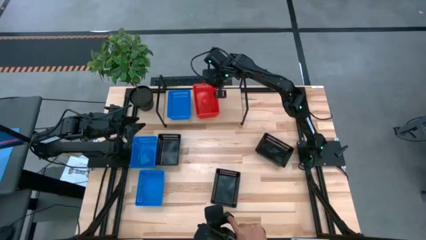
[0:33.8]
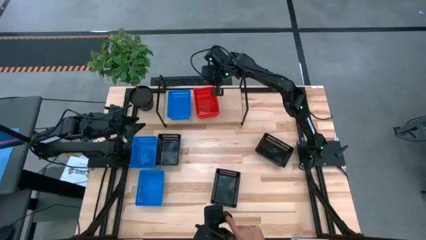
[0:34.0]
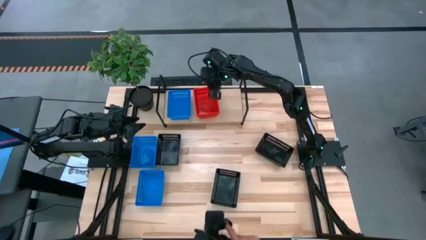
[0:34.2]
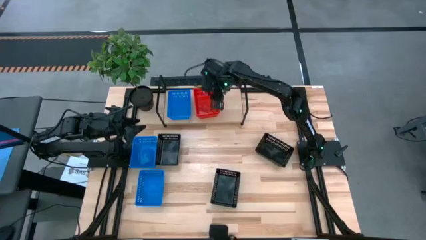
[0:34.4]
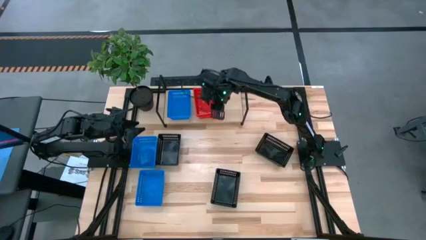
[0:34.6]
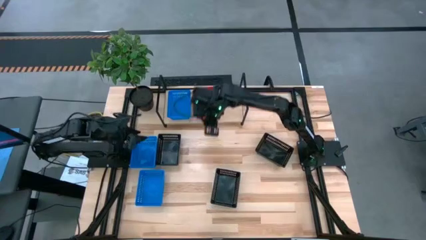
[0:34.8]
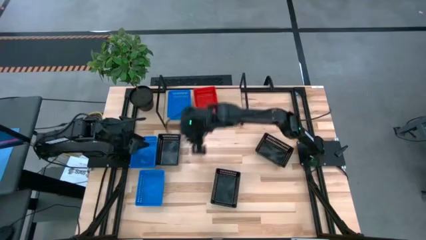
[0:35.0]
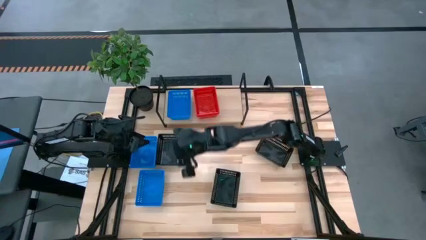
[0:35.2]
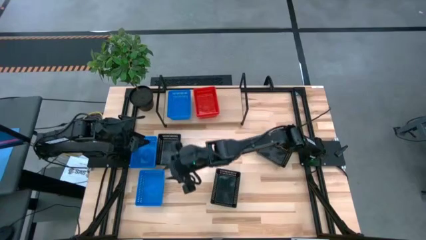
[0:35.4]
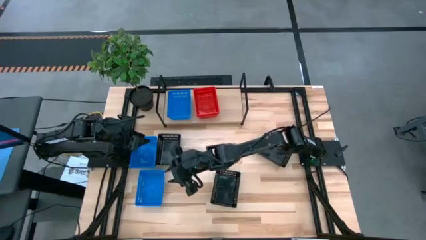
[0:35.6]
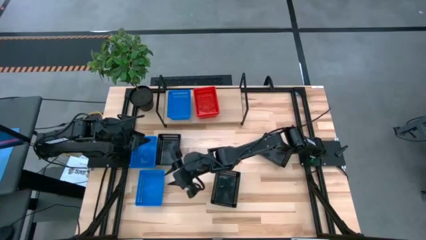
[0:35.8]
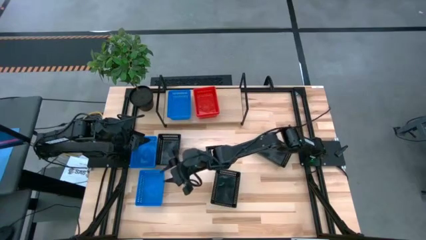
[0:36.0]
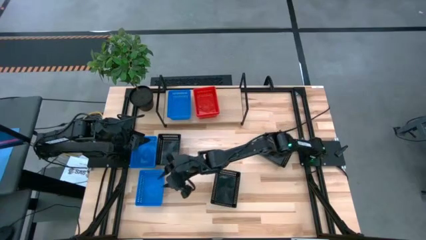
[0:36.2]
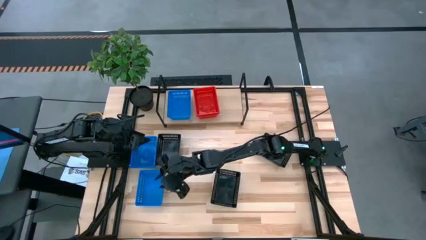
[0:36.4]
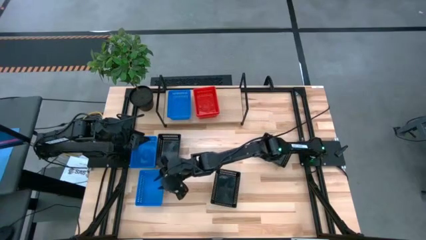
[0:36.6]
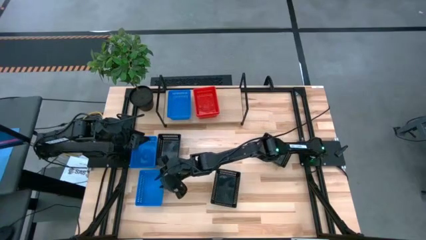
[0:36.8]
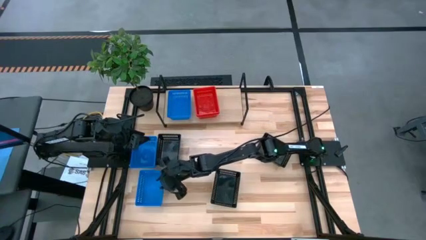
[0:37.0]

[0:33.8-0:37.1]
Task: Stack baskets on shelf by color
Stack the blue bin on the blue bin on the shelf

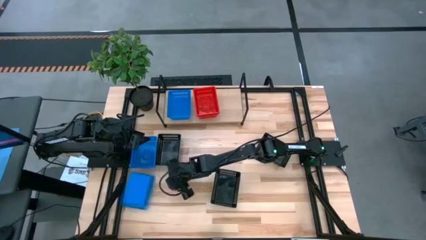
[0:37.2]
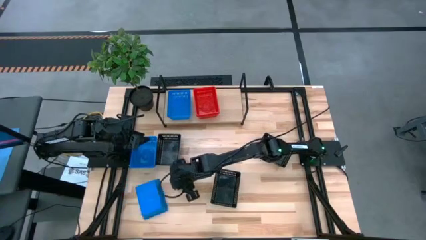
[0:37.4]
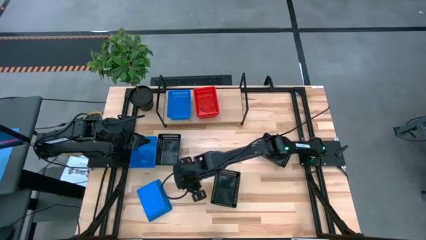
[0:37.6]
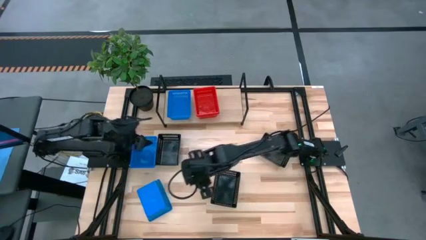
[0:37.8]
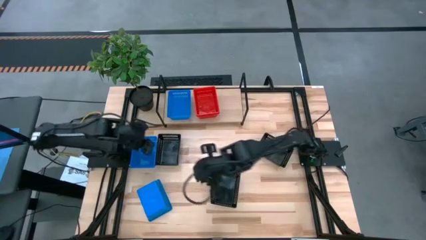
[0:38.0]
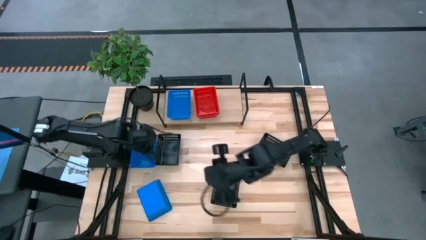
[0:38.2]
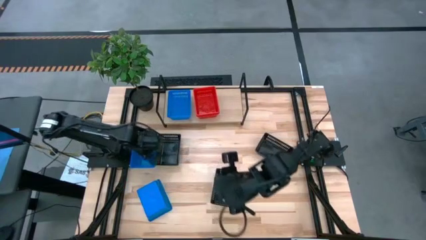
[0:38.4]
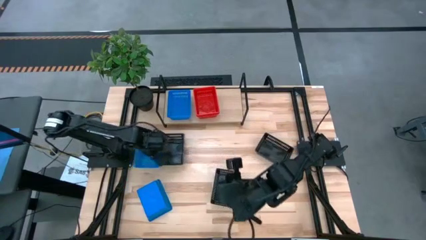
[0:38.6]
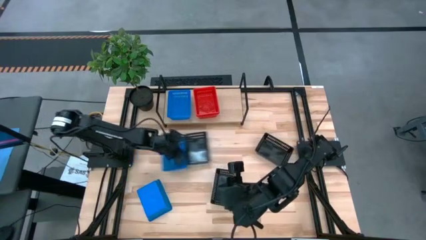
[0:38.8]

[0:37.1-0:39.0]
Adjust the blue bin

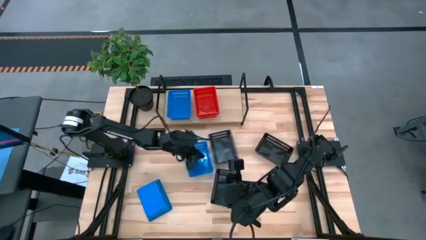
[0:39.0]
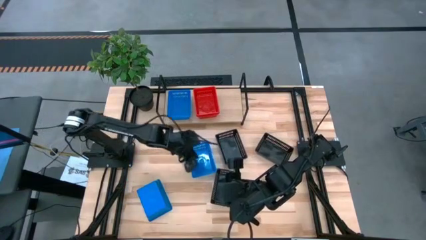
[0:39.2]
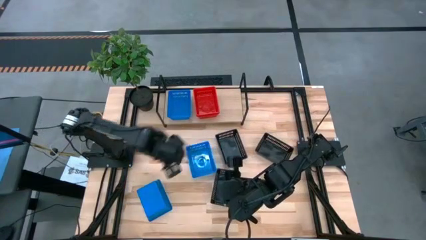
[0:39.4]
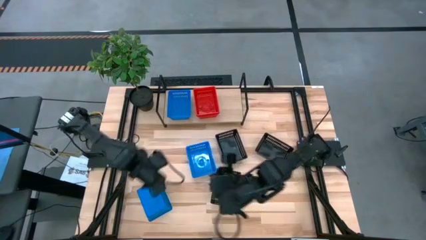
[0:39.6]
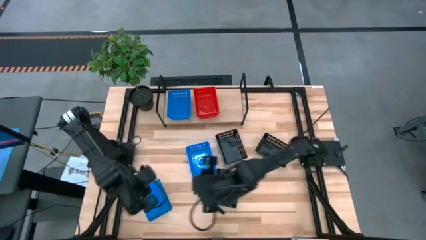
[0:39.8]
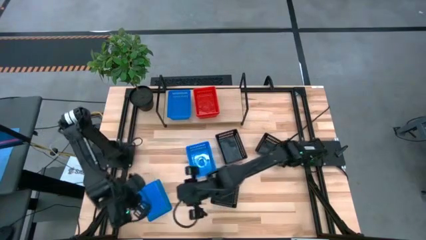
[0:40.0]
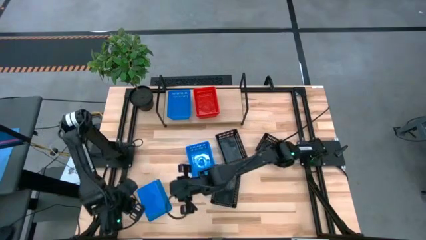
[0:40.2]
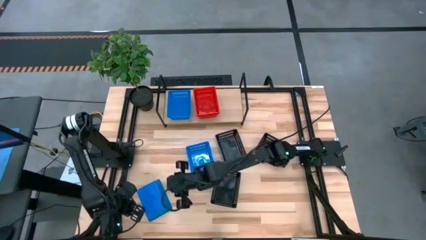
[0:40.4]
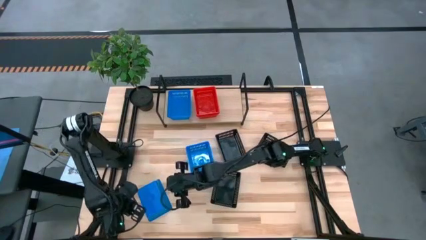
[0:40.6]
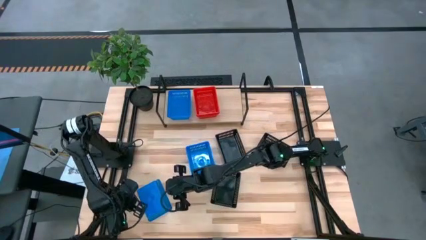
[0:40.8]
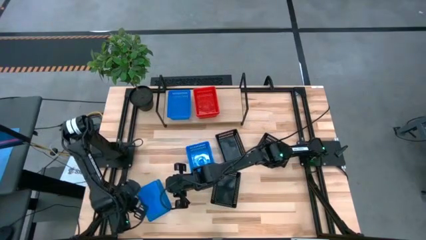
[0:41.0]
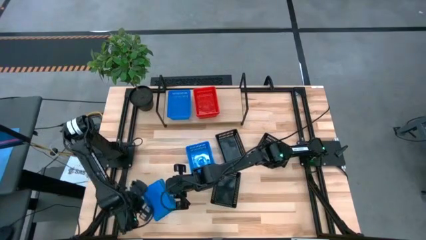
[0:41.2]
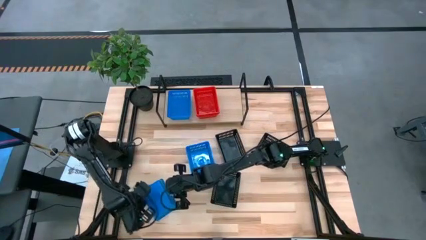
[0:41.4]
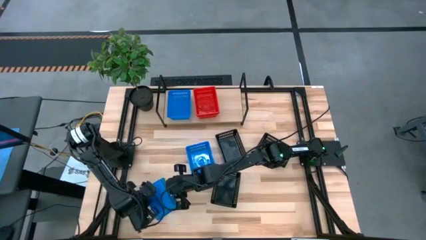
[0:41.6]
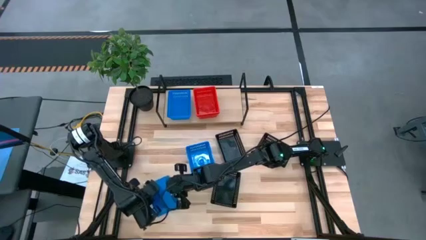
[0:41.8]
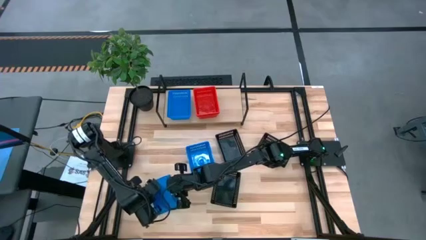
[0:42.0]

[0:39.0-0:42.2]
Stack the left blue bin on the blue bin on the shelf

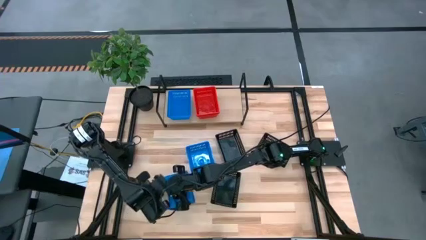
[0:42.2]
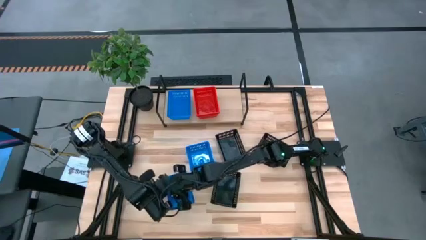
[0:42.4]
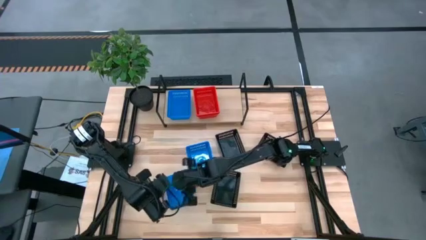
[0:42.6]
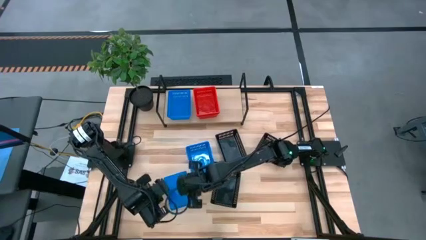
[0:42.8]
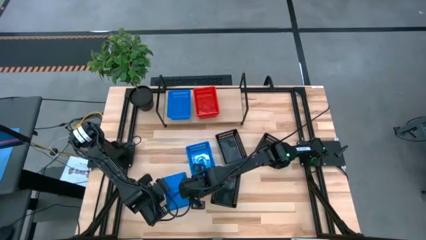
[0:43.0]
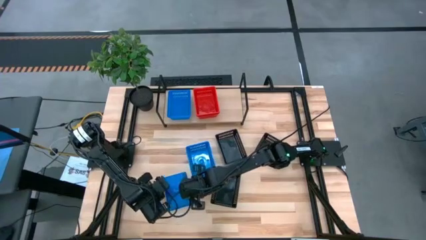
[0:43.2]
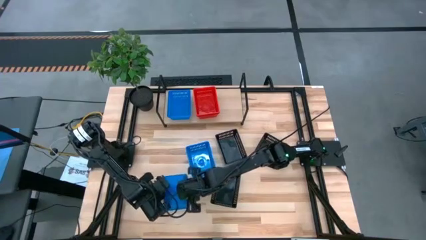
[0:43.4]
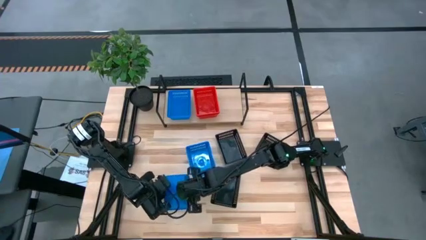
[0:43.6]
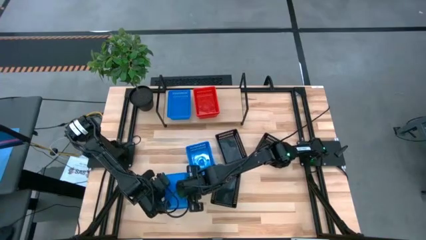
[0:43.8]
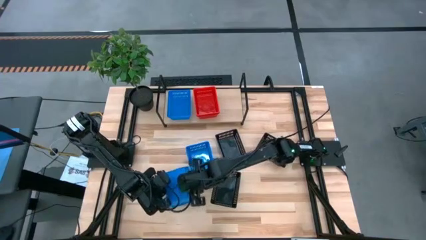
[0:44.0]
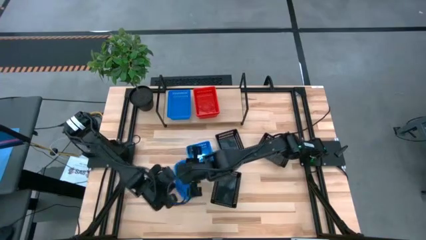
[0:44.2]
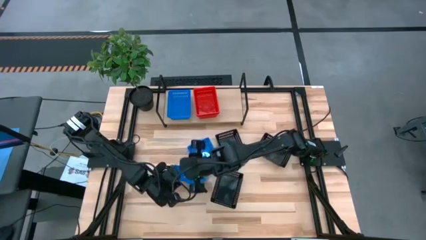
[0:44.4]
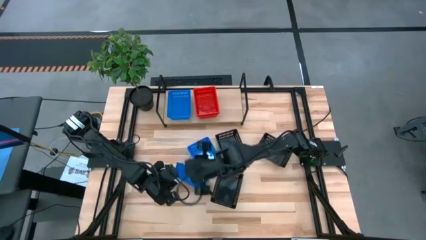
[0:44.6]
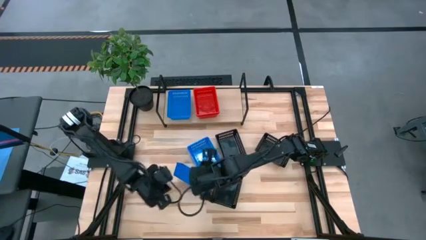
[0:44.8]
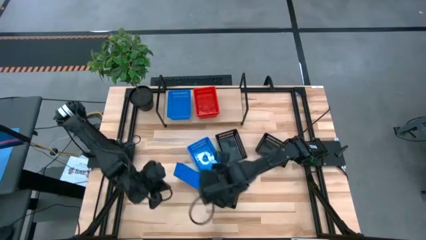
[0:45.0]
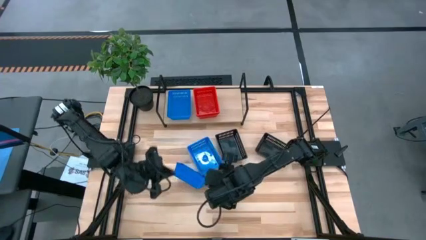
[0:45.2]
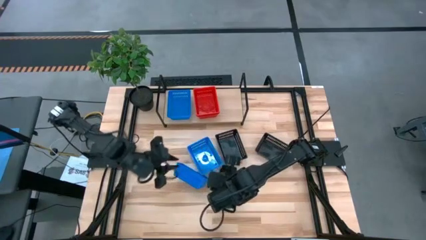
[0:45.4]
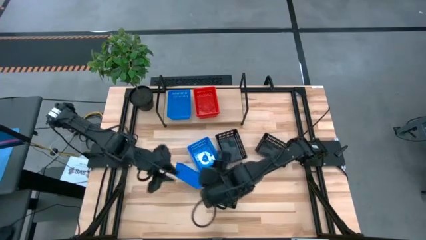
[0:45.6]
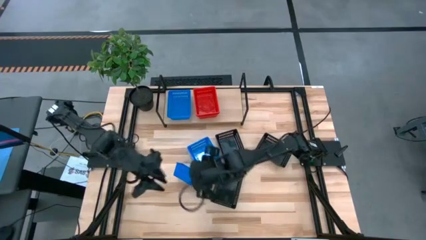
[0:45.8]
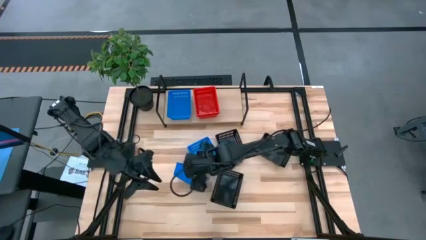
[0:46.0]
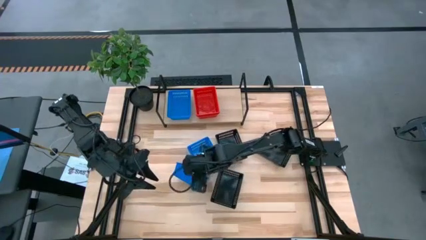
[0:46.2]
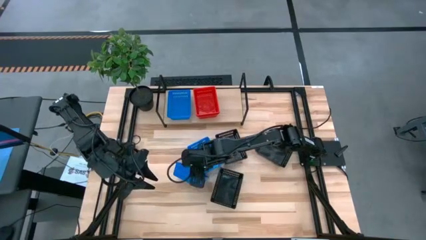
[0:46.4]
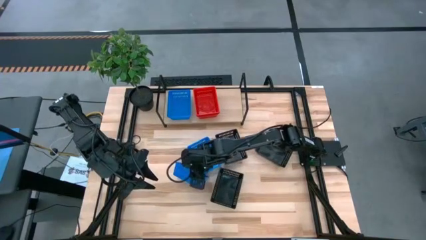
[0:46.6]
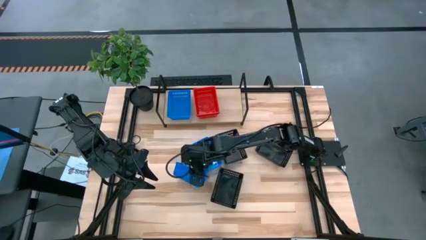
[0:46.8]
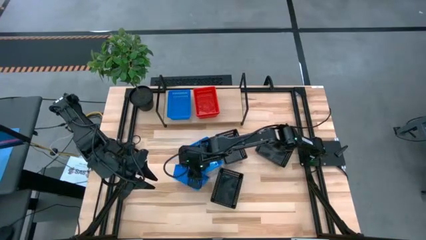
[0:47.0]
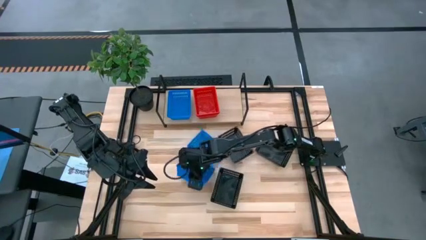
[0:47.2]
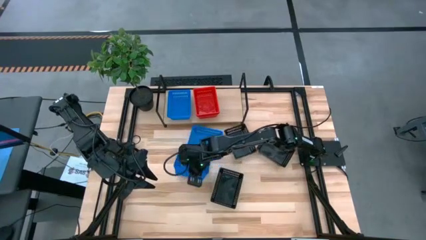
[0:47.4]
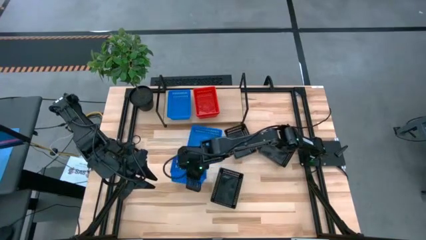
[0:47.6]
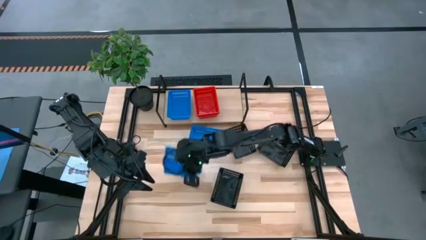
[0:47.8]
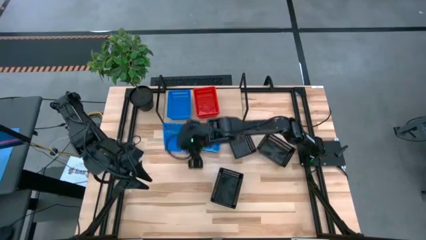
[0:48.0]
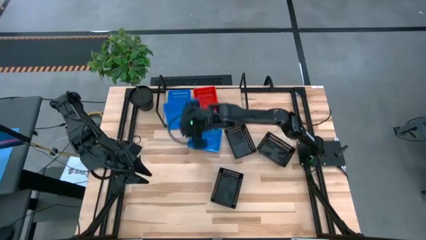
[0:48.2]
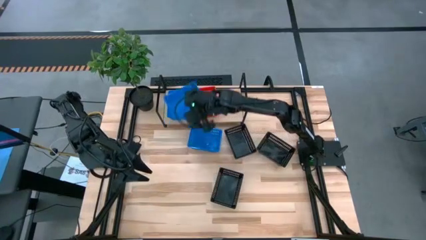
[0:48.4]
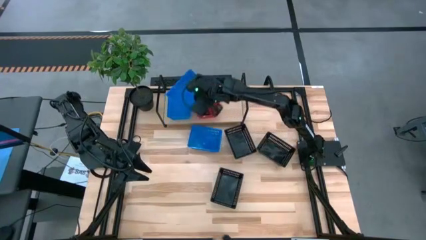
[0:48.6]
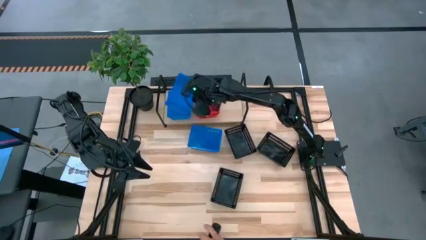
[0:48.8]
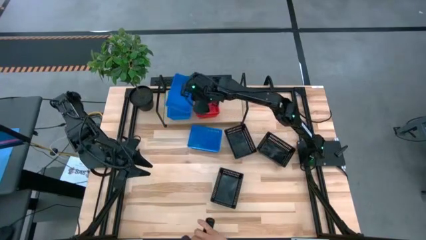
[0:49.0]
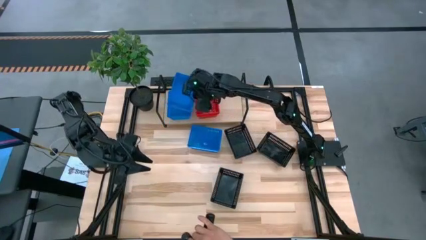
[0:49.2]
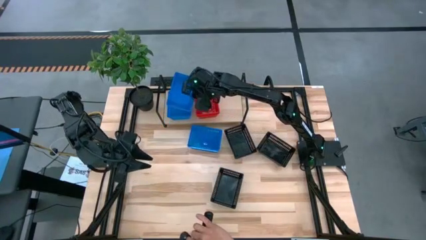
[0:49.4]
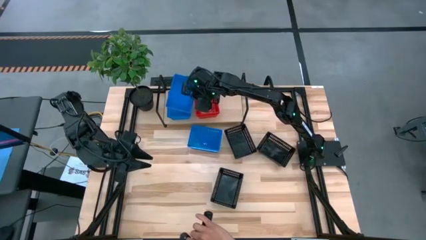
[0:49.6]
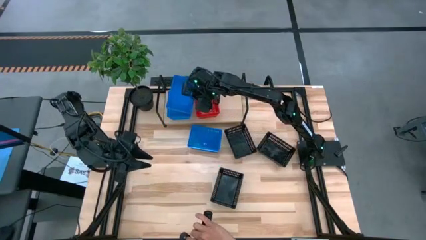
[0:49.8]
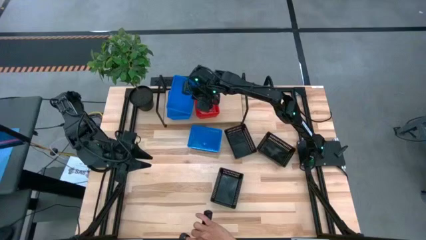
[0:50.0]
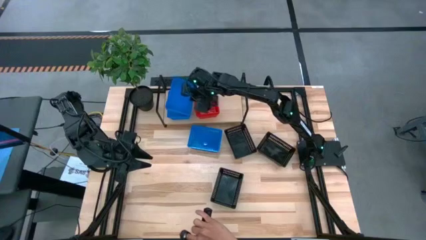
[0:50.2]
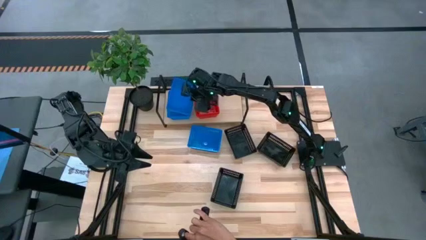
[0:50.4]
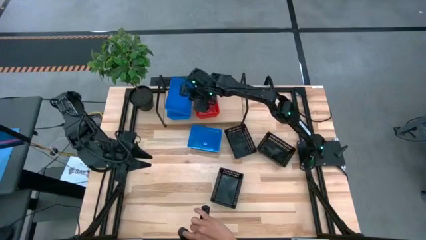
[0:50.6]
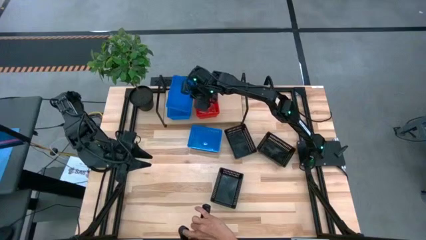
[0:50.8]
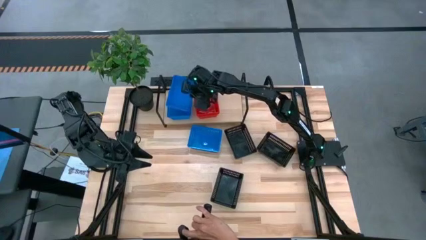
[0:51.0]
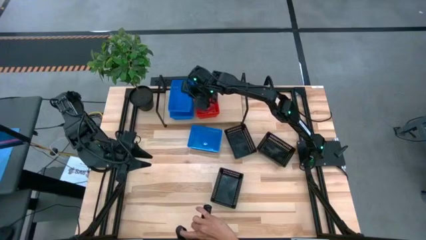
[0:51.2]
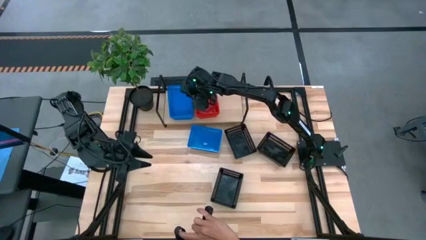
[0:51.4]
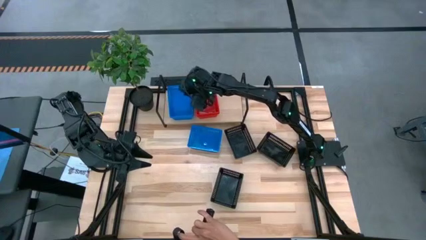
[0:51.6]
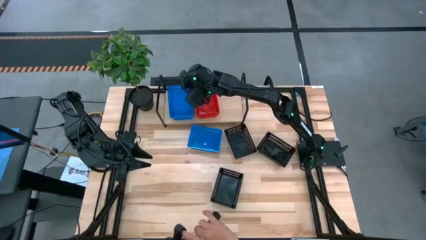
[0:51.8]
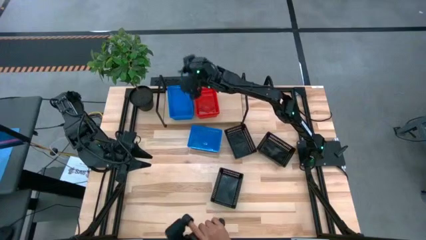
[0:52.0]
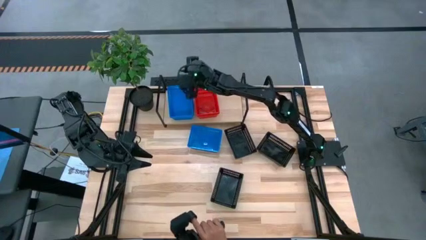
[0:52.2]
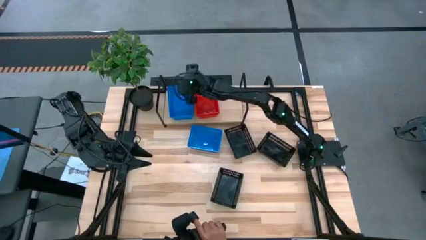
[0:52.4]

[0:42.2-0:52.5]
Stack the left blue bin on the blue bin on the shelf
